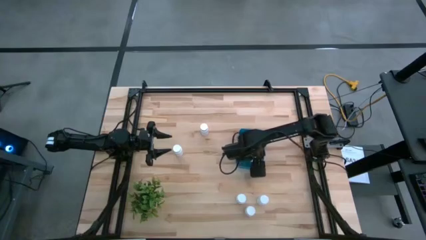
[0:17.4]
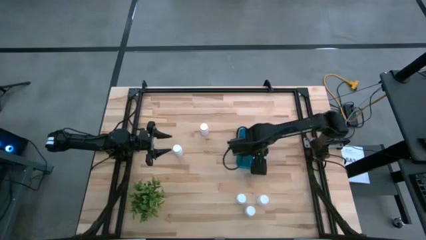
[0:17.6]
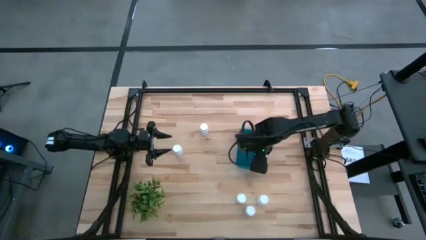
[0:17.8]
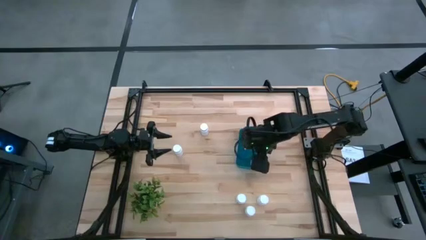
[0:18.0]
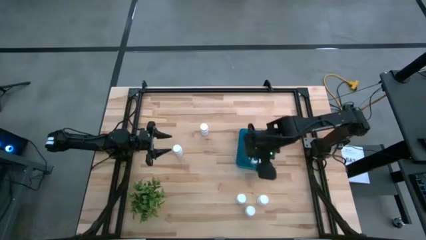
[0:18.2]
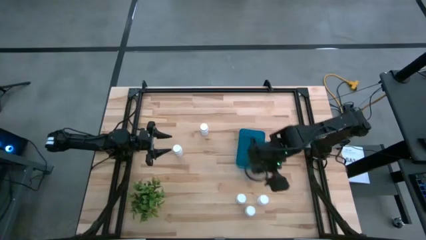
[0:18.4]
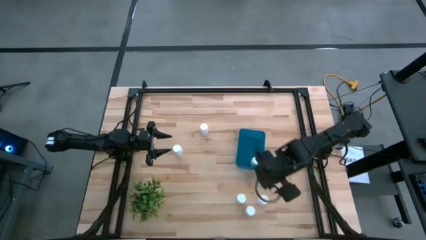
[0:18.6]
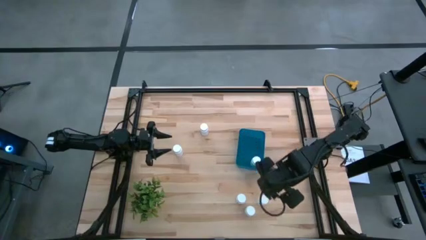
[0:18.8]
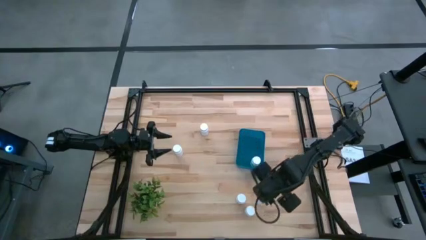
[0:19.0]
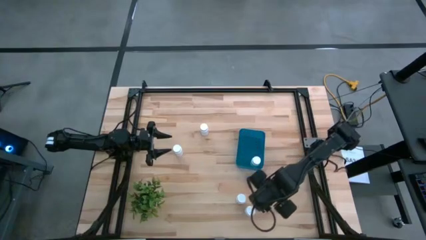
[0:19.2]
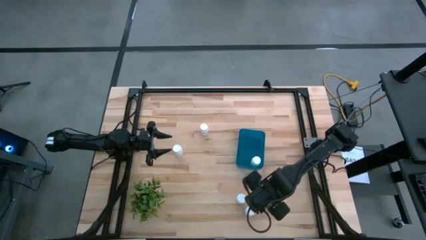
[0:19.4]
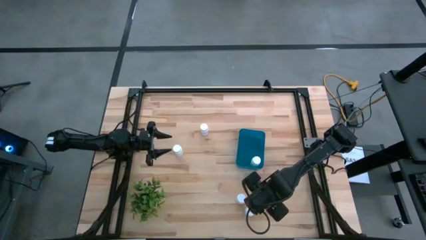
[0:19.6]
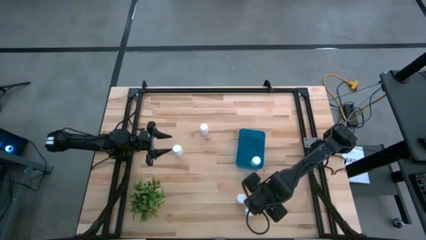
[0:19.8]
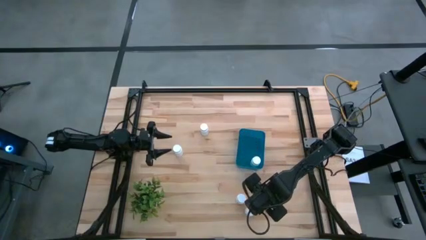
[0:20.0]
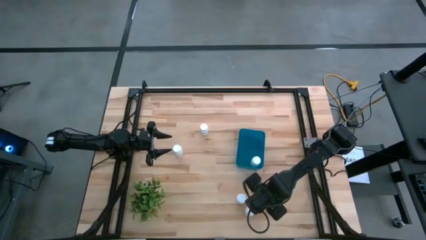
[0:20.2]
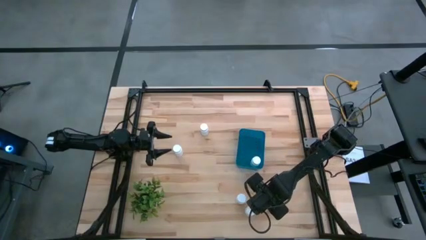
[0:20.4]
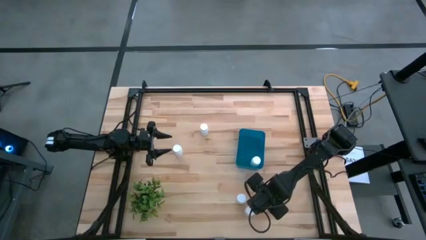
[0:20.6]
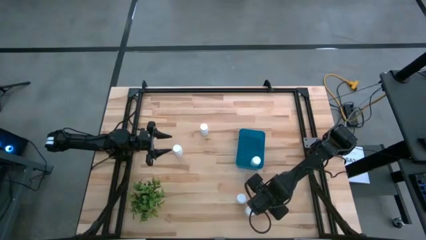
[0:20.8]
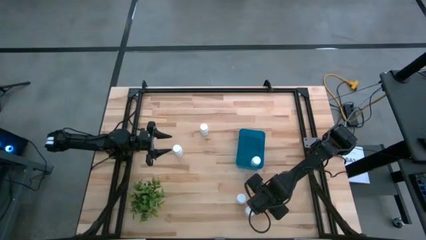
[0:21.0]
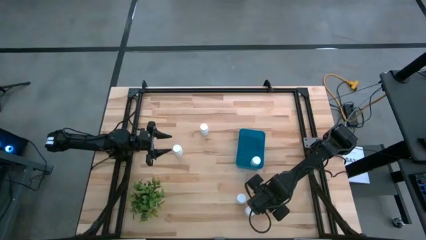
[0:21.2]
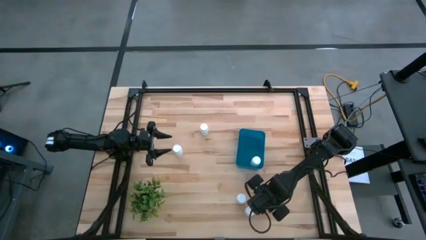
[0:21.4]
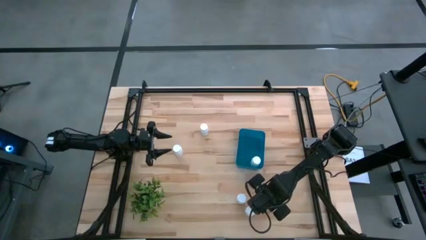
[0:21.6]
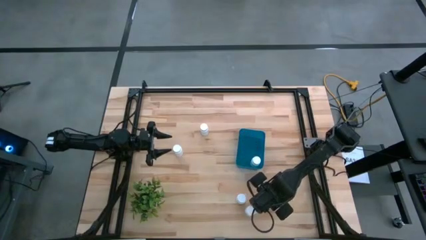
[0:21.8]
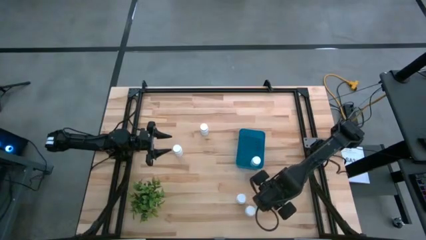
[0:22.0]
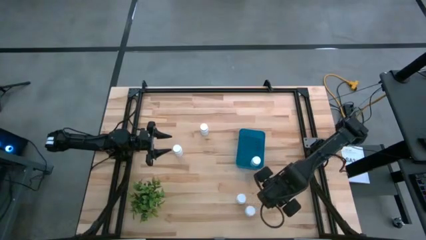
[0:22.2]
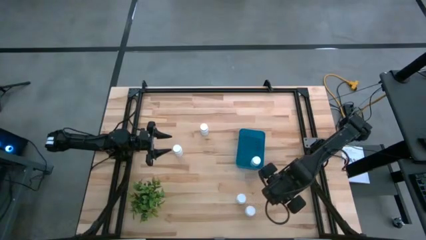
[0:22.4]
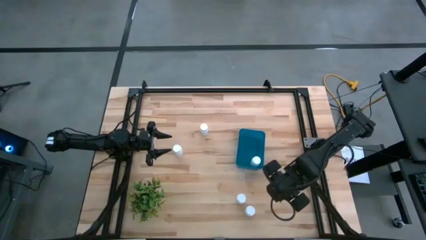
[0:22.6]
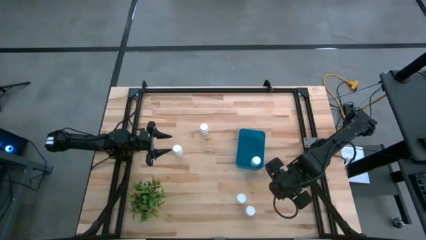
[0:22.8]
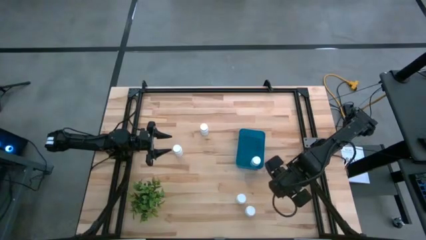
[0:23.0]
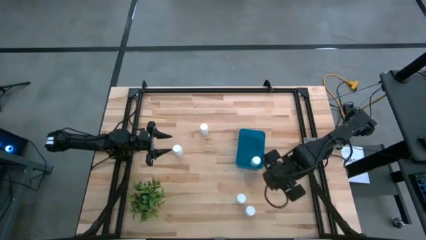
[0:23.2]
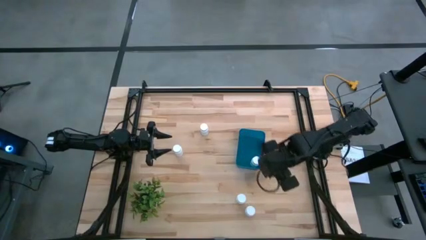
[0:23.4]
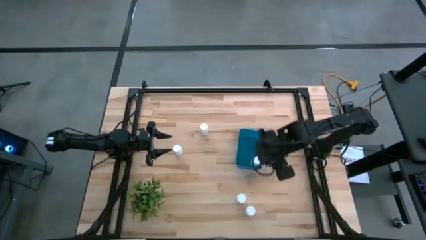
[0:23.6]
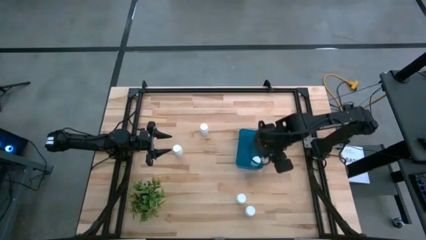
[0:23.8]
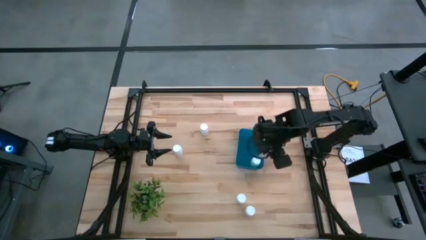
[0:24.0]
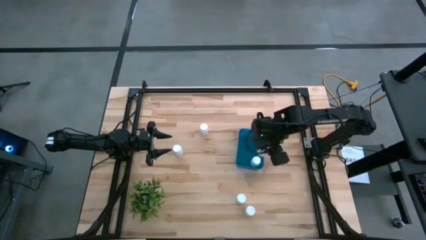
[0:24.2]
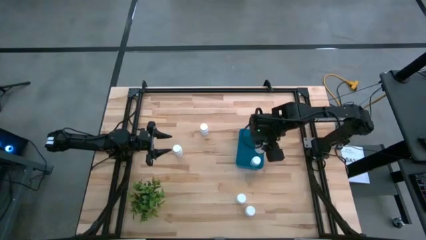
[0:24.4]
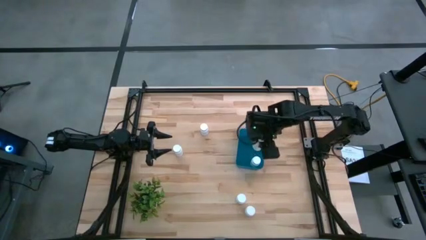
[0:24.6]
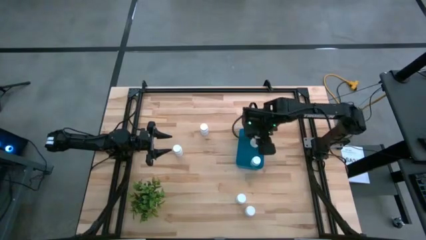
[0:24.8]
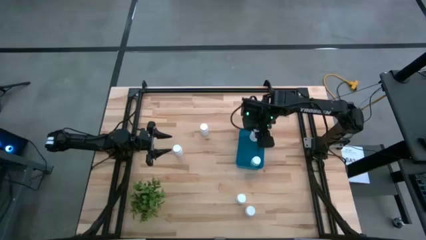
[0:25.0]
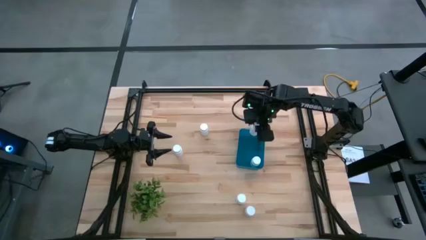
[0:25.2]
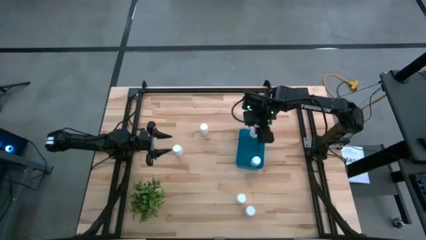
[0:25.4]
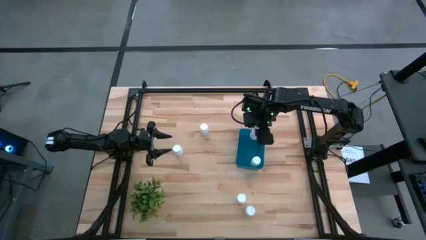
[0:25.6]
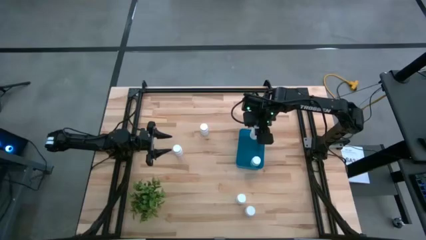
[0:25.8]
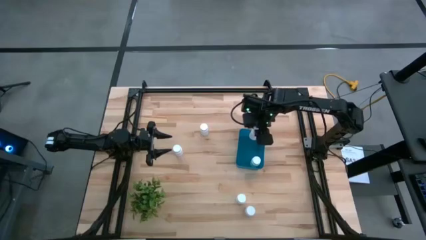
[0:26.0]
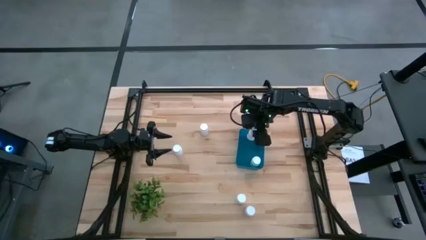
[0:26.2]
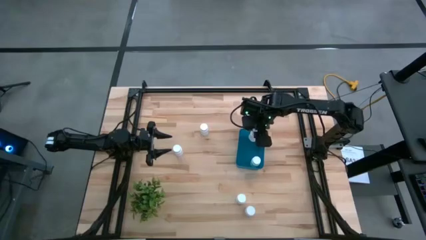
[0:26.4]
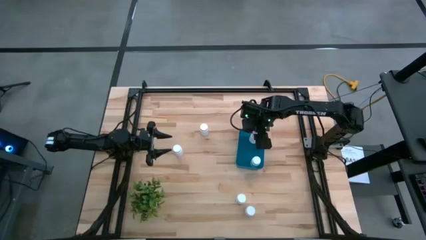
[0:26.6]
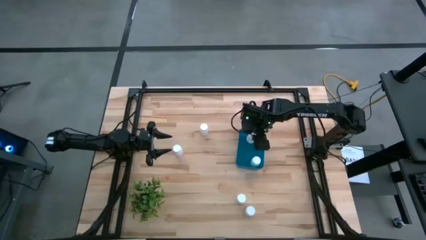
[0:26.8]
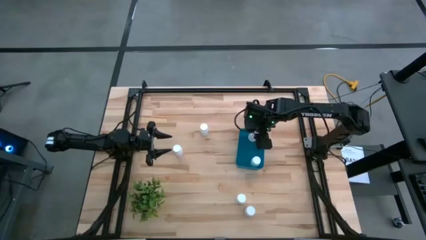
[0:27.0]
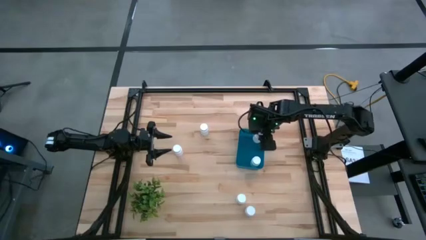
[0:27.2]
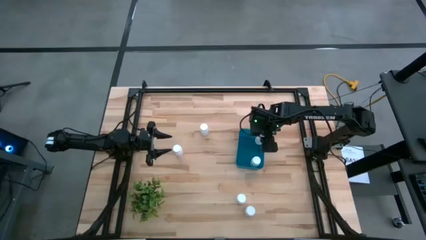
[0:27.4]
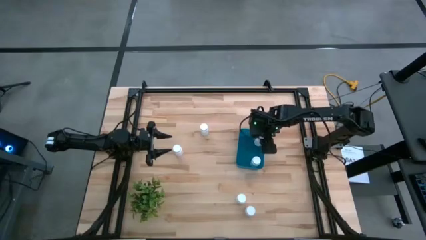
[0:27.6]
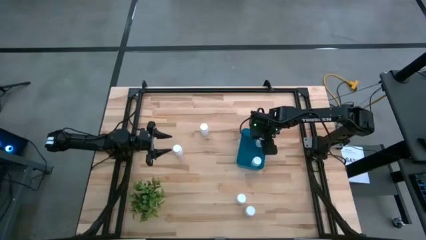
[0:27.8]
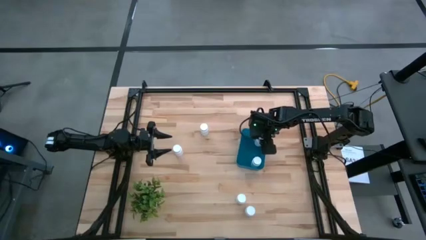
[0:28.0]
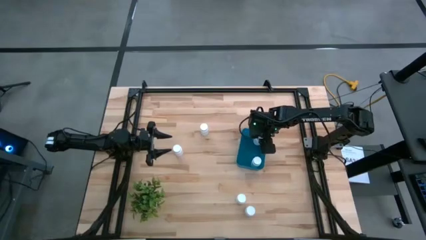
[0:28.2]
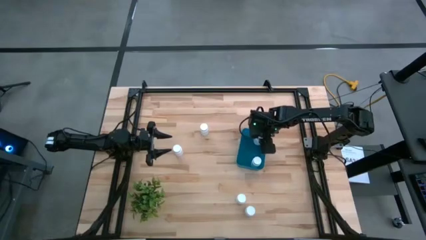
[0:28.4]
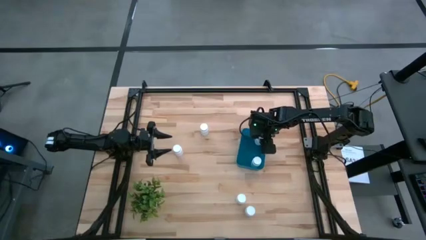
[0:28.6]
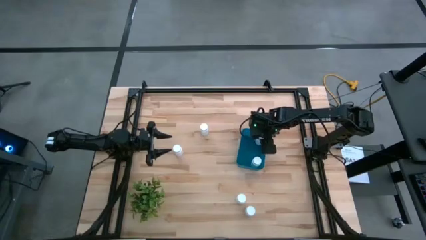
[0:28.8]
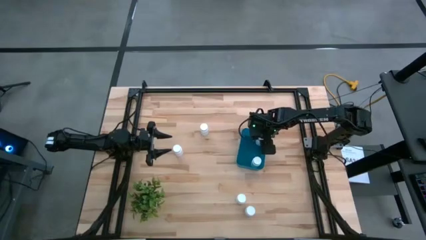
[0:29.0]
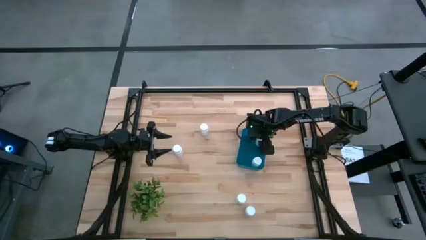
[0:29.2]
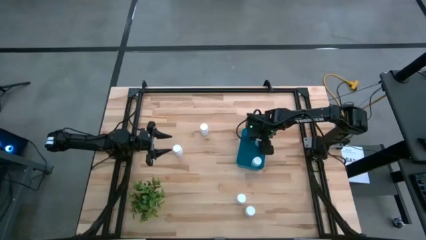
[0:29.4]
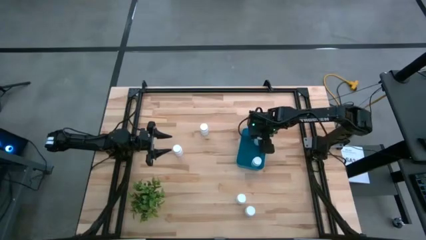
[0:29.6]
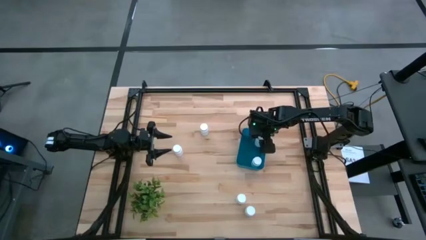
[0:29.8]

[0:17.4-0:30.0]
Task: Pick and place pill bottles into a basket
Put the white medicine bottle into the blue bin
